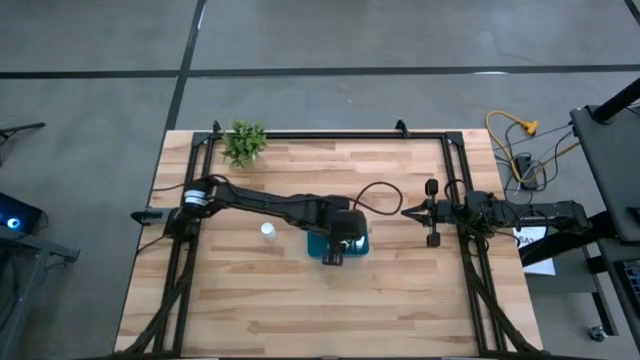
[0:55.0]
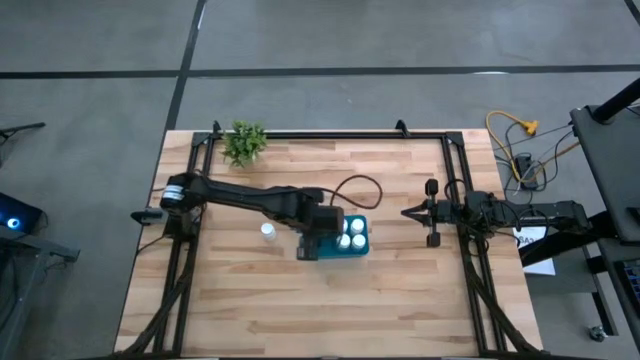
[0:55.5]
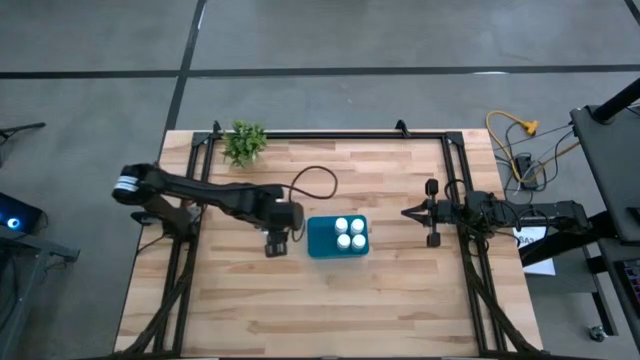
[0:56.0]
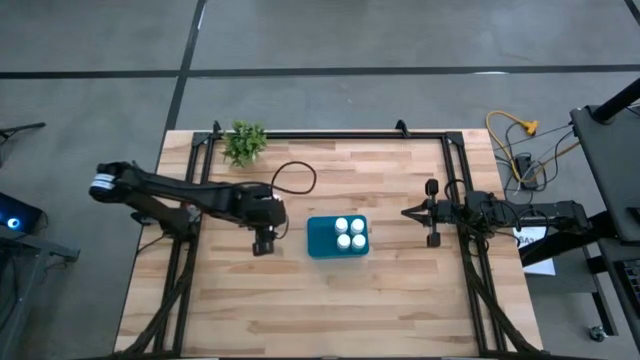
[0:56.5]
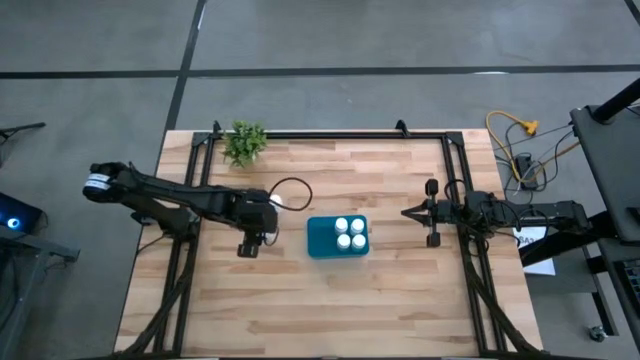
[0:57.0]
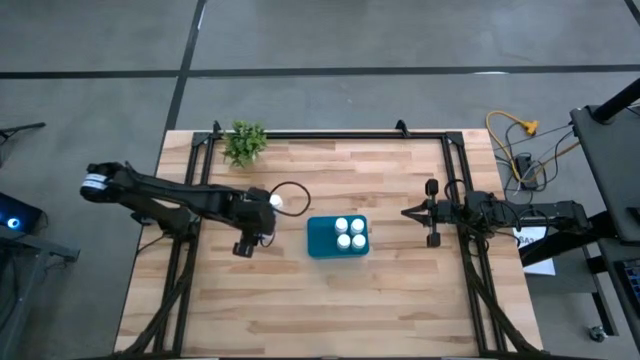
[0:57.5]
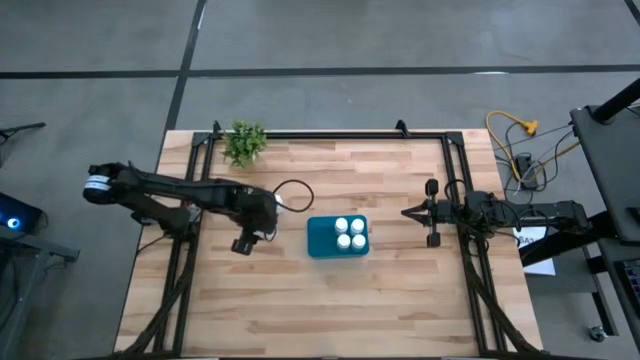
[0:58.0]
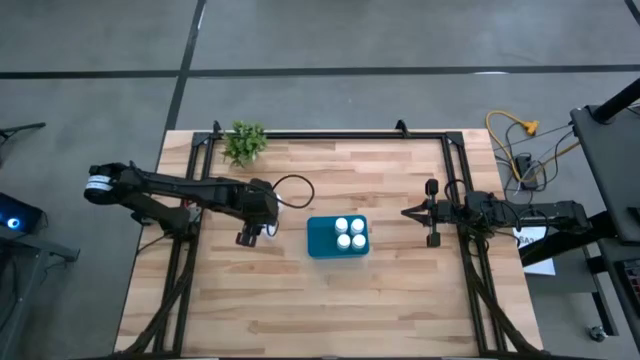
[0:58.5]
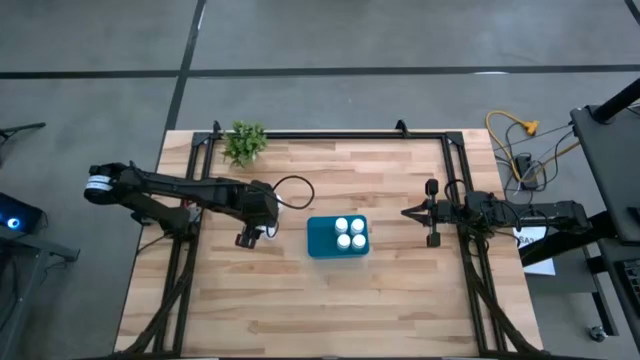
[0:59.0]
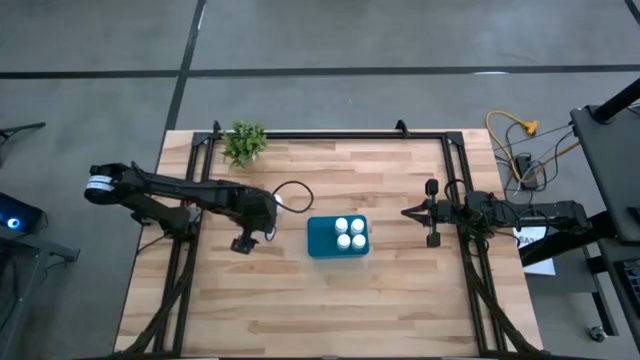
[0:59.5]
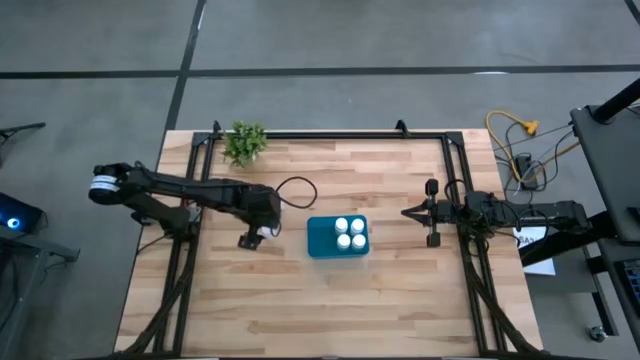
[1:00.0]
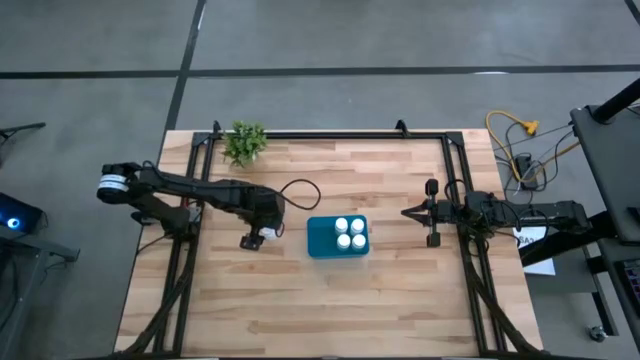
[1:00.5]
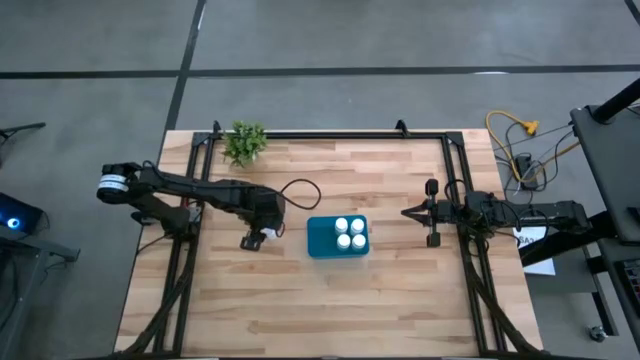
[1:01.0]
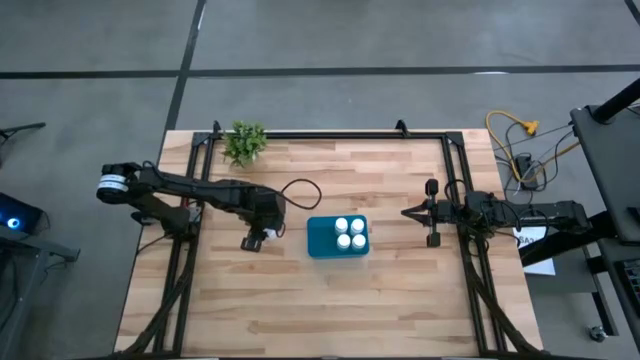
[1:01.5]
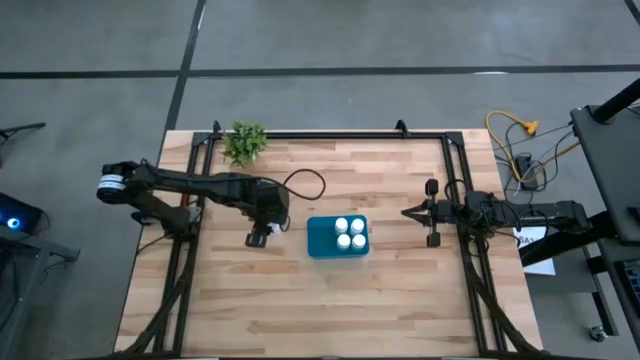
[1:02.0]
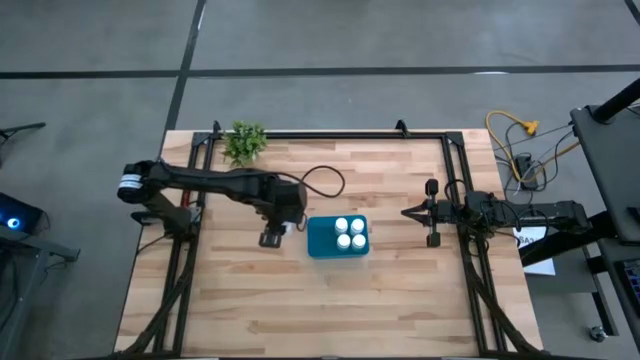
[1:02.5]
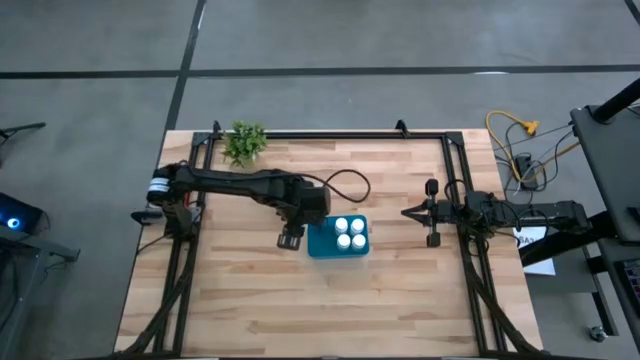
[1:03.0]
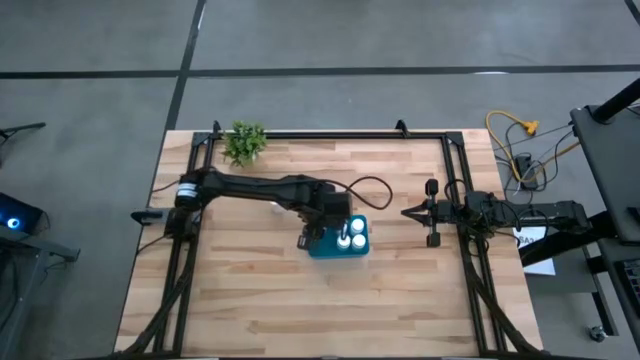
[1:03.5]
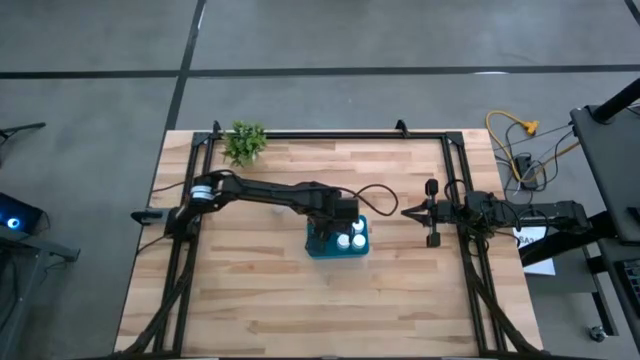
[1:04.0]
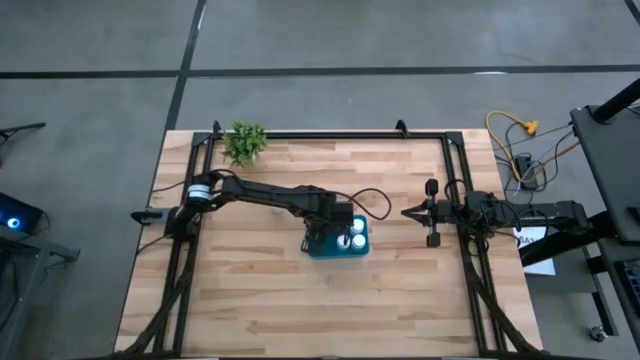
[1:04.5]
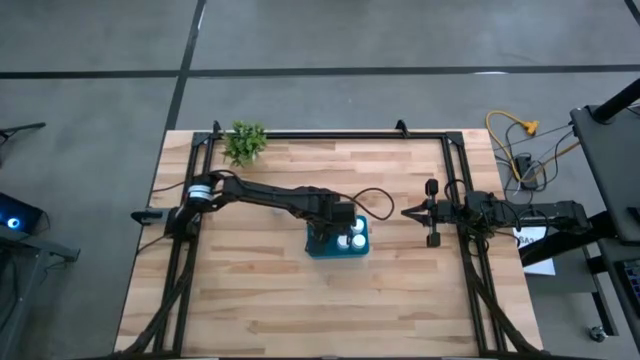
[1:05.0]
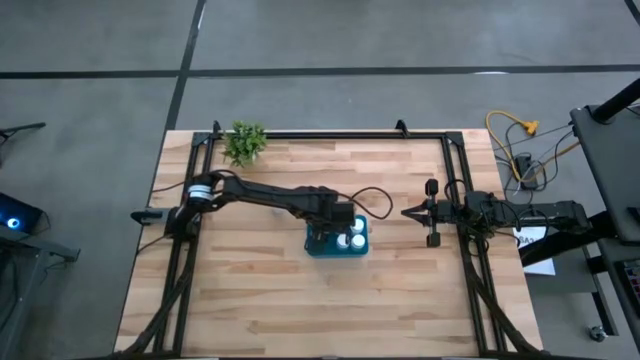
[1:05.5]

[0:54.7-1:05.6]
Task: Pick and place pill bottles into a basket
Put the white pill bottle into the blue bin

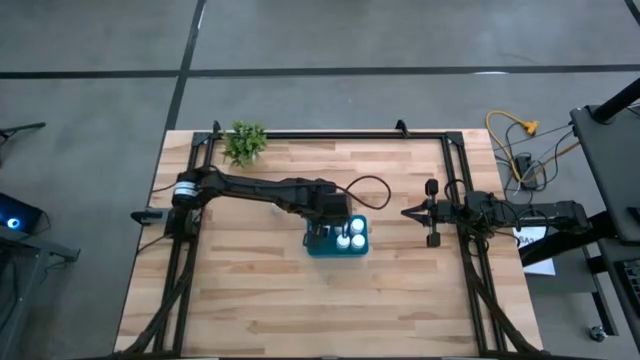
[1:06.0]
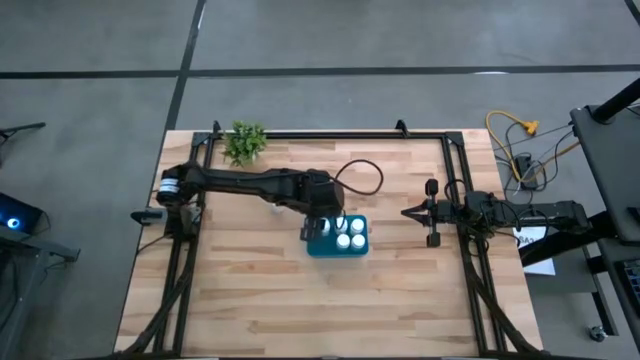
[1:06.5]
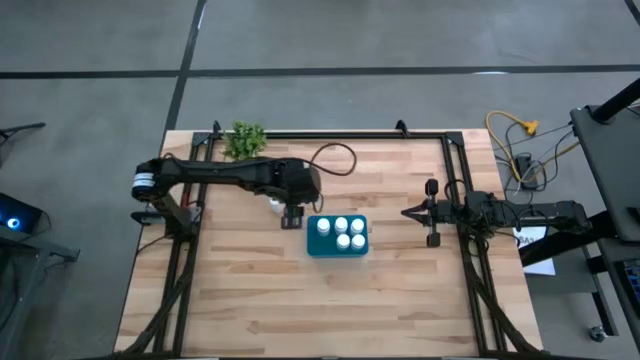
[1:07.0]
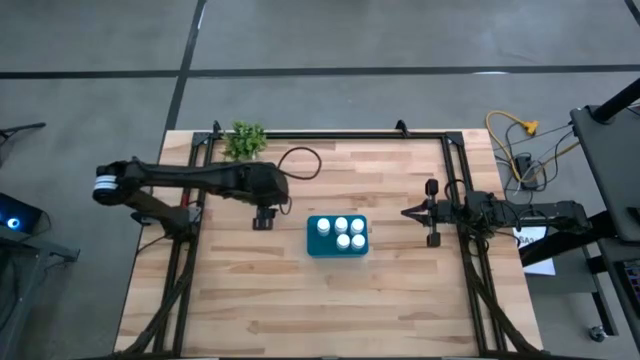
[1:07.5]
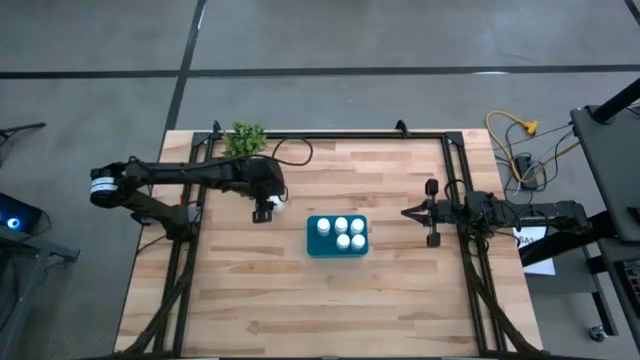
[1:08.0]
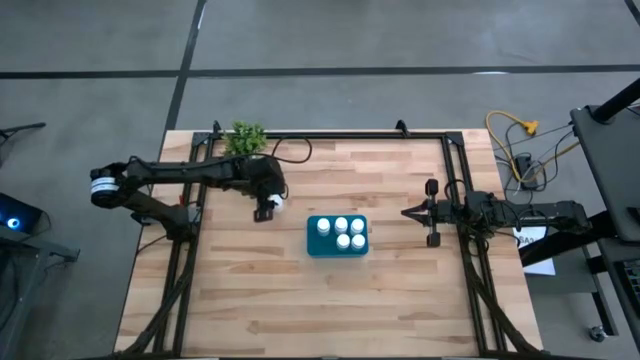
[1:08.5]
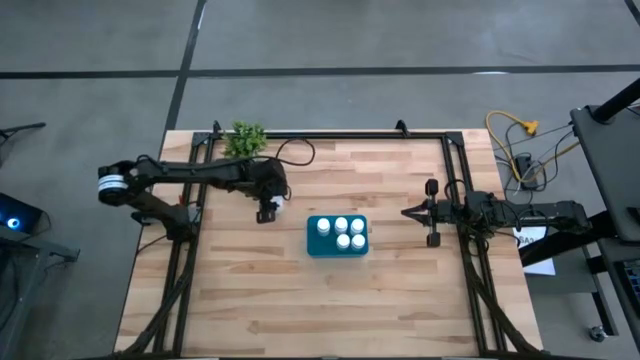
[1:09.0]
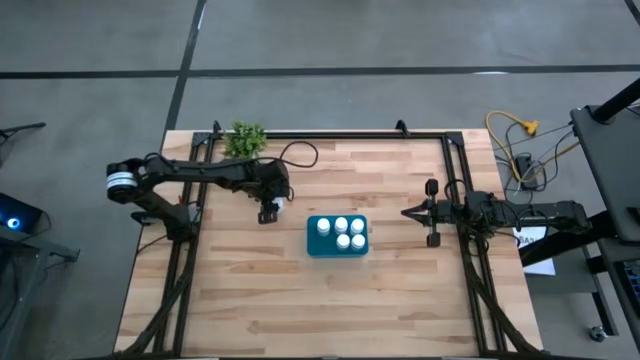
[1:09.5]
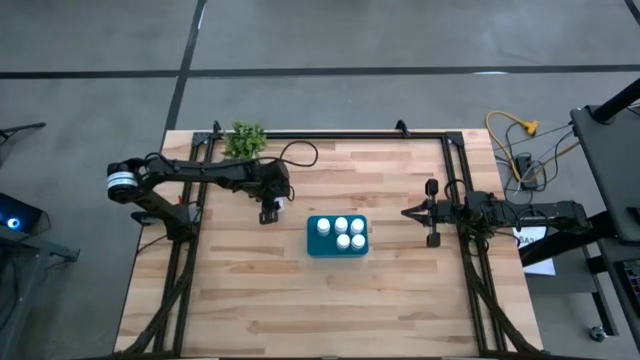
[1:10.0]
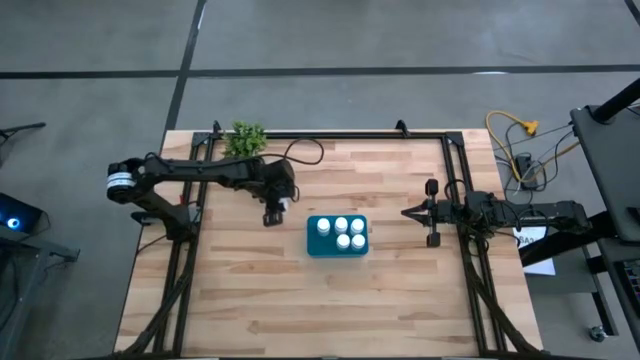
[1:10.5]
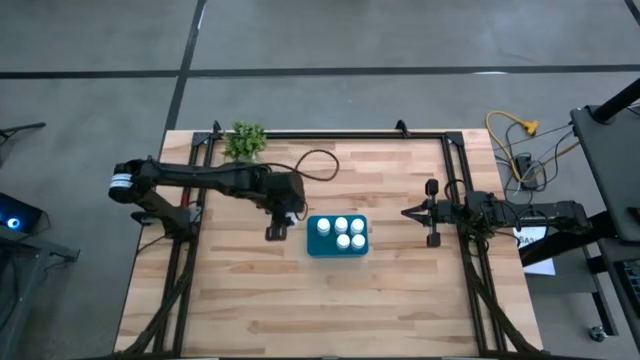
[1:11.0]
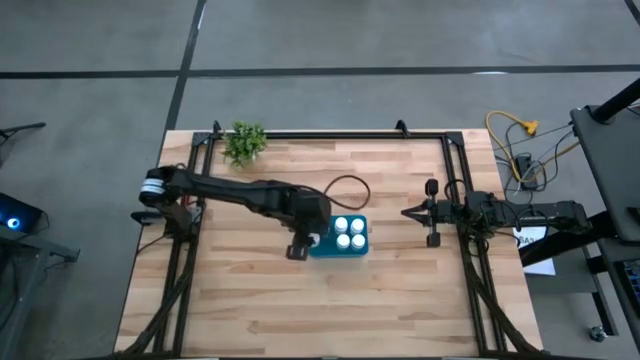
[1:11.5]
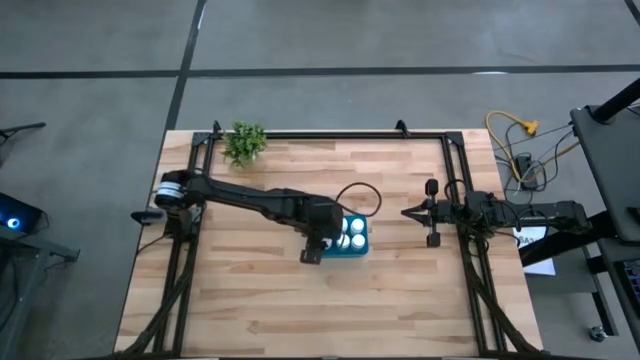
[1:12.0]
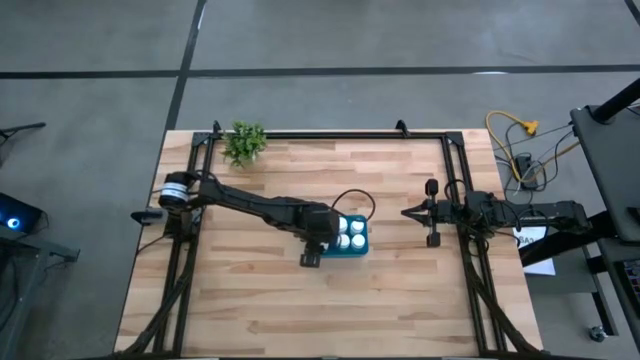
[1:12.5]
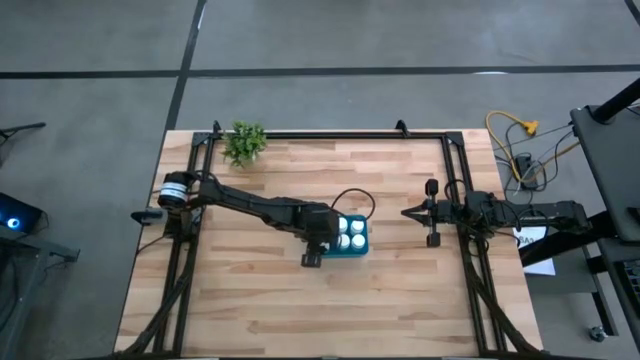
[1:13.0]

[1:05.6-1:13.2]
Put the white pill bottle into the blue bin

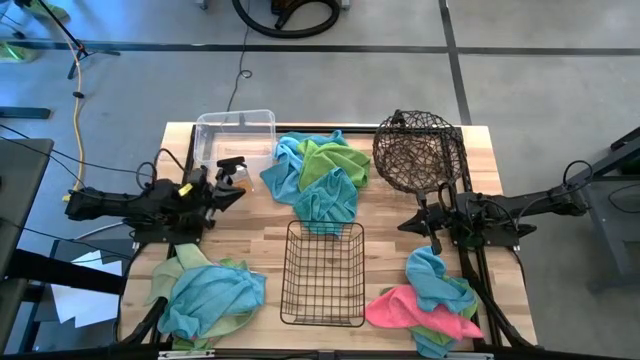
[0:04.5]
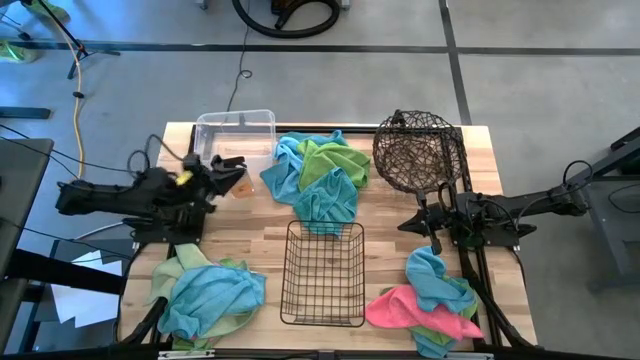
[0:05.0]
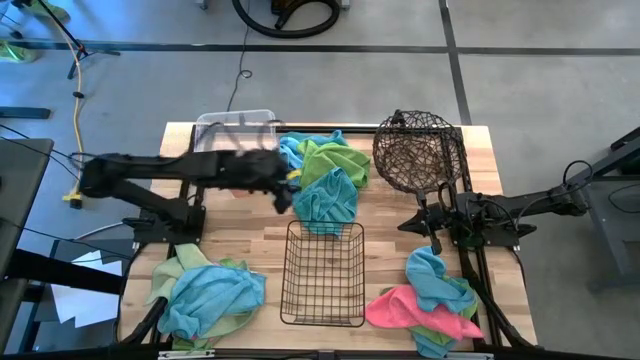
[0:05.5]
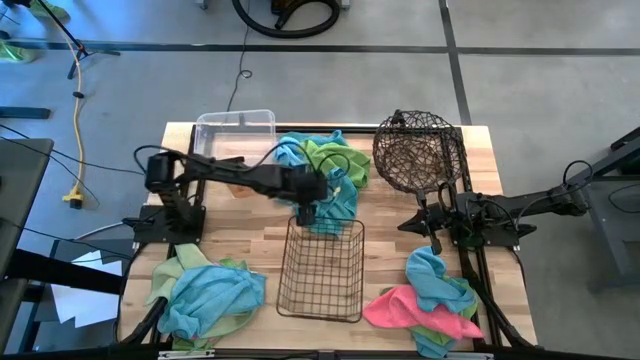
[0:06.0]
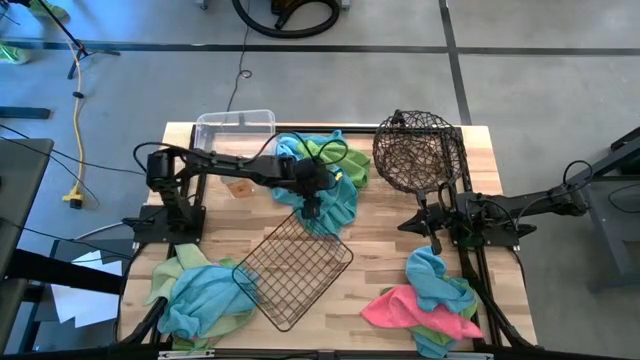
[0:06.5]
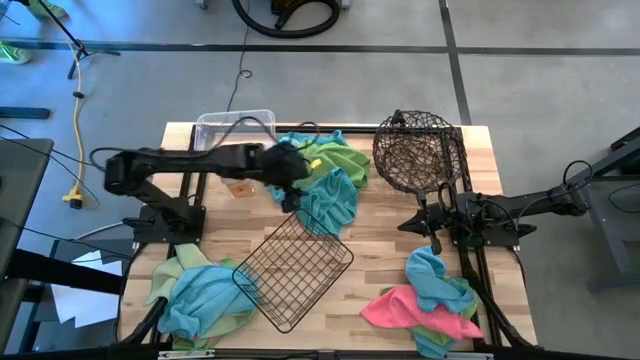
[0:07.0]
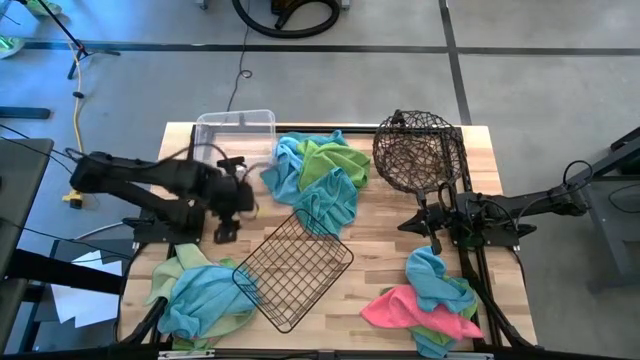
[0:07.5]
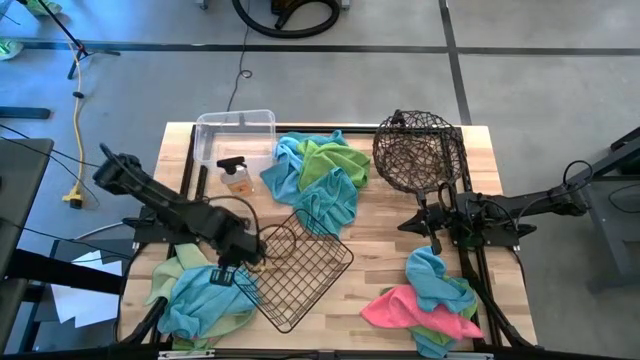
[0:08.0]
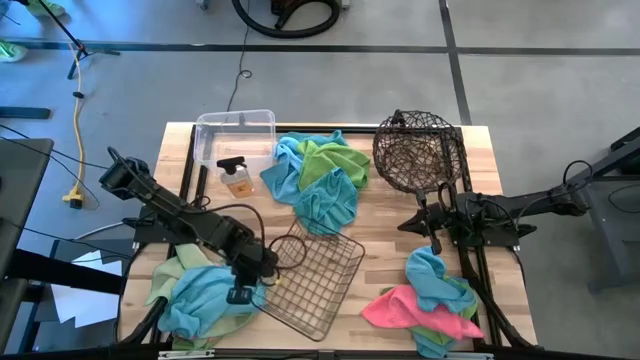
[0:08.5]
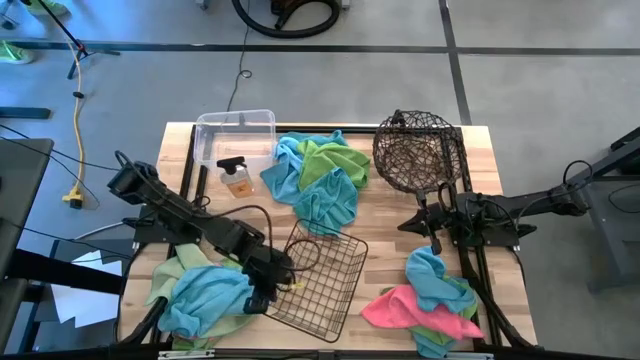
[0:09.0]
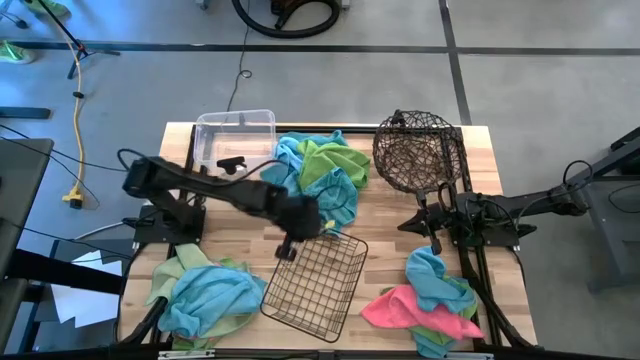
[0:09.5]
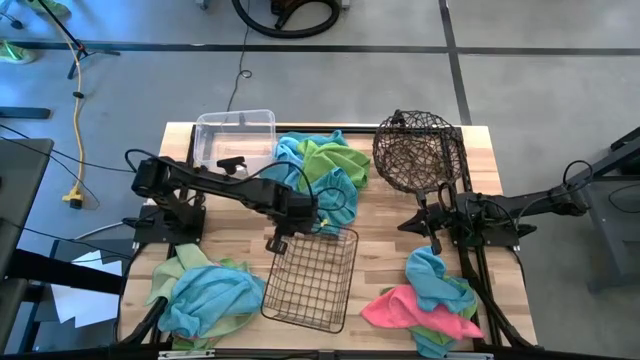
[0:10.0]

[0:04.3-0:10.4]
Task: Sort microfiber towel by color & place in baskets
Adjust the black wire basket on the table
